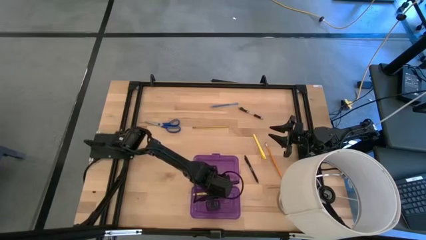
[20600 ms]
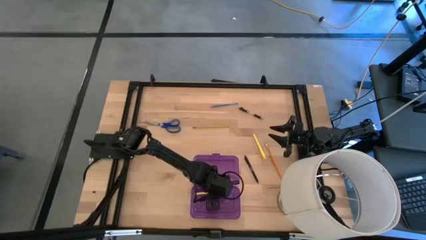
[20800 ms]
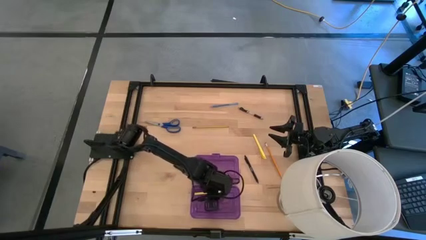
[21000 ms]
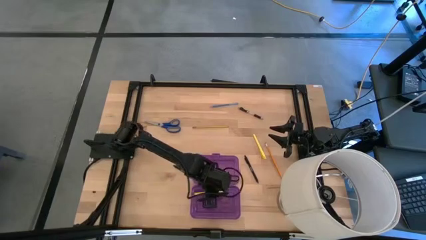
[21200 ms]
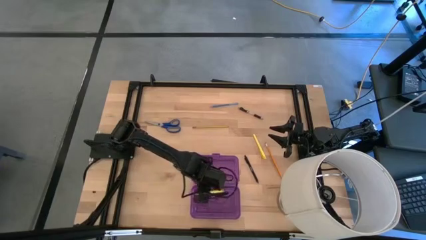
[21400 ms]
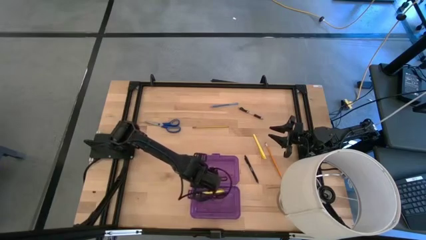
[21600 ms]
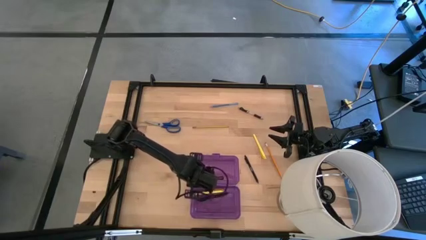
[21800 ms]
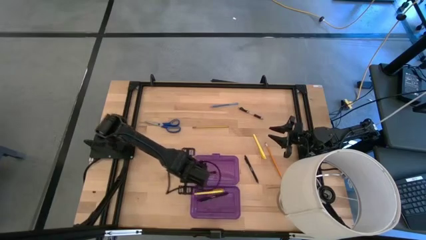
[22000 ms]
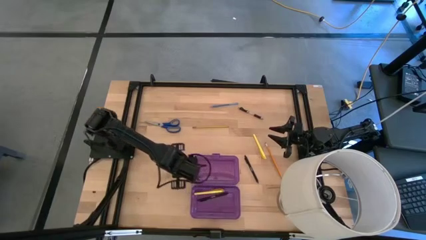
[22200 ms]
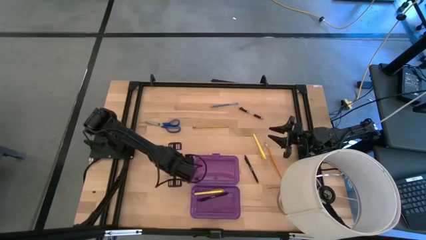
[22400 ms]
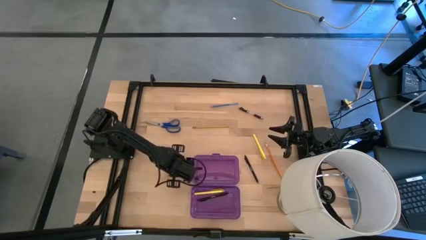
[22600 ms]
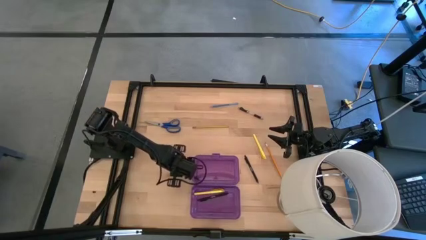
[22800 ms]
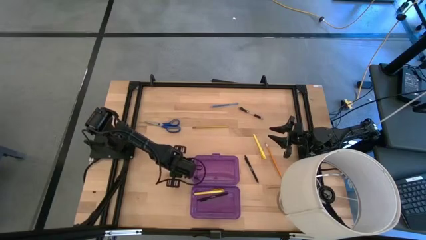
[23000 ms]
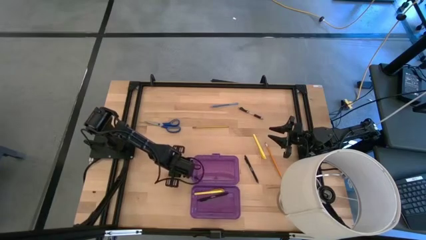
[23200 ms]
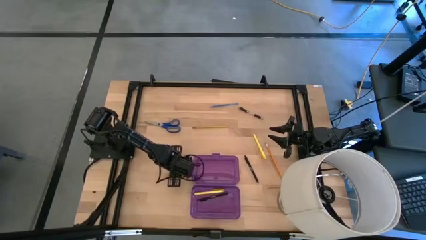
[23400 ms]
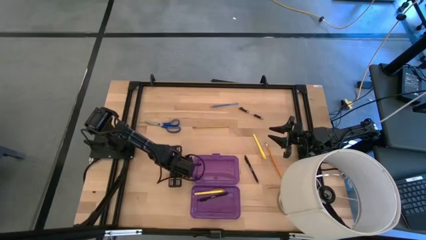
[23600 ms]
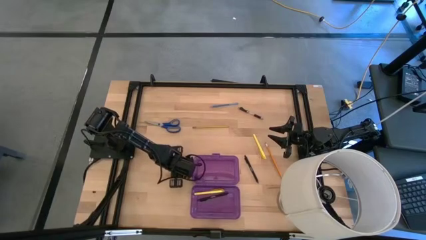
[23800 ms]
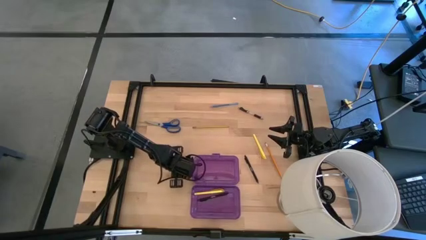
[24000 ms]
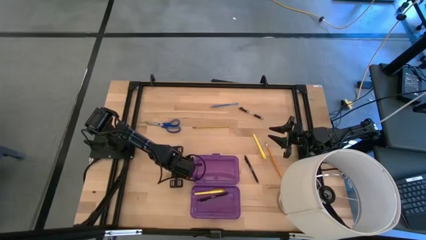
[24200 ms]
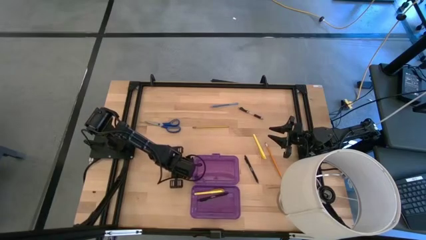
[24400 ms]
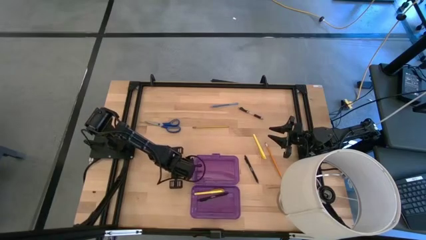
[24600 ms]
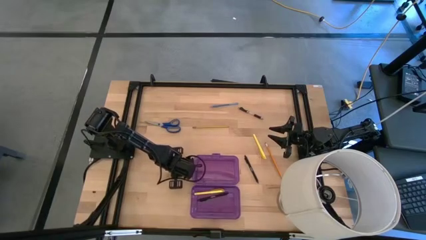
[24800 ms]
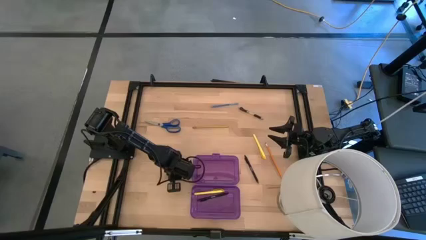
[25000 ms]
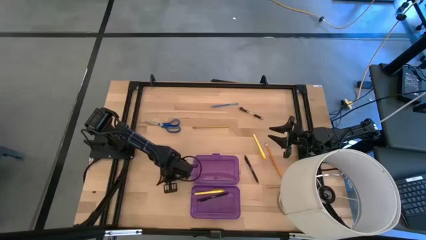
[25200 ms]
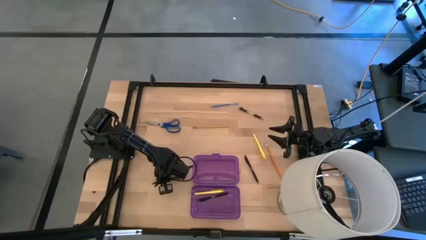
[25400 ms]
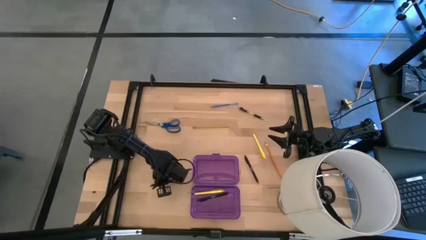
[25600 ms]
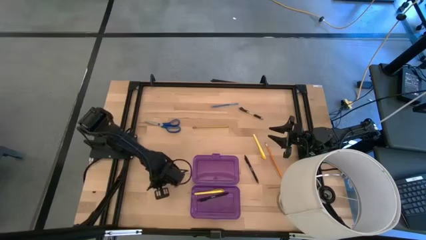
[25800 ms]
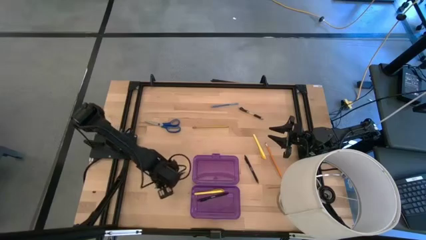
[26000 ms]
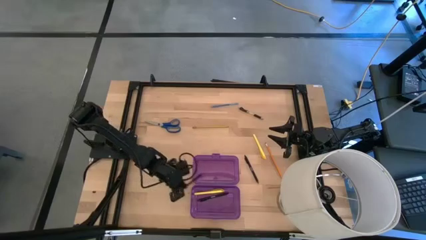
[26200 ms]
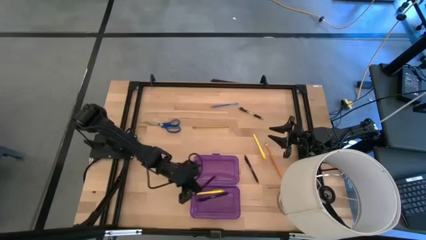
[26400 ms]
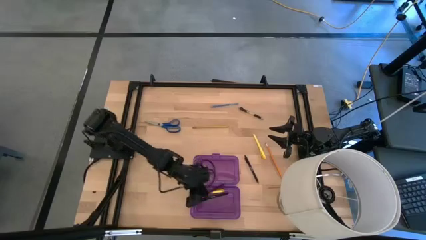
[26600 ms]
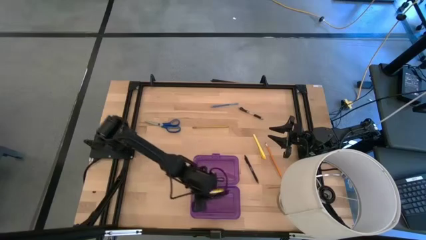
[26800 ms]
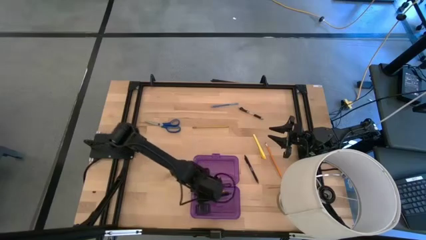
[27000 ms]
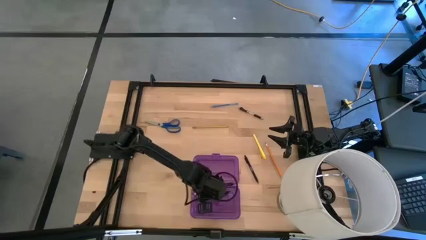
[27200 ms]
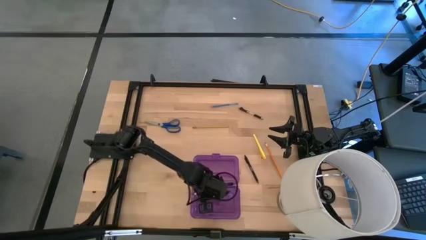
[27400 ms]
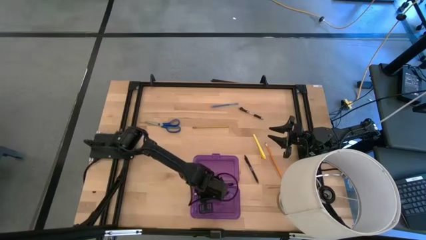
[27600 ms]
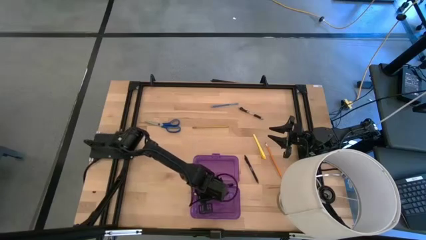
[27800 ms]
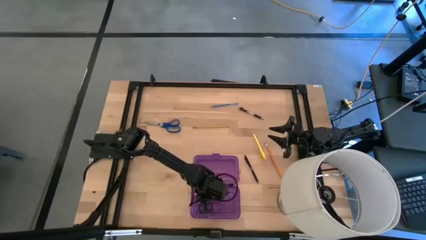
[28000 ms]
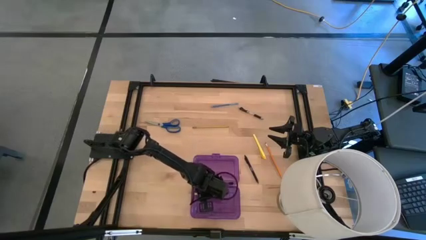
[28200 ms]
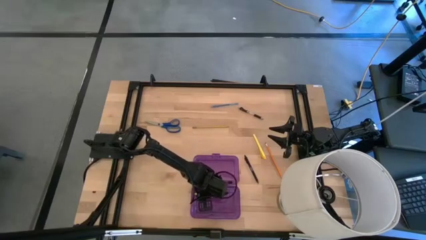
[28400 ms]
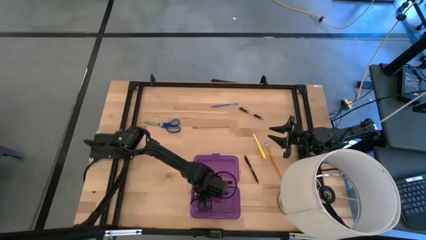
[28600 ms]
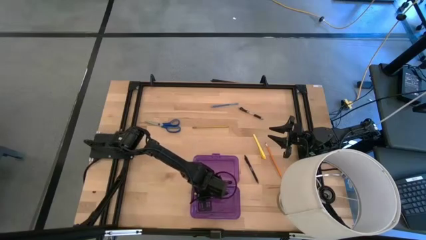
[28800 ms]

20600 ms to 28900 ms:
Task: Pick & place school supplies into a supply box
Put the left black pen into the violet supply box

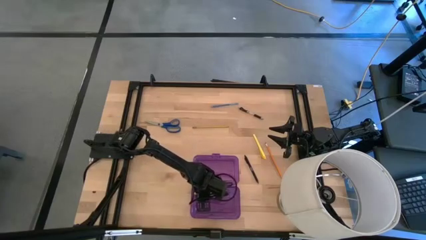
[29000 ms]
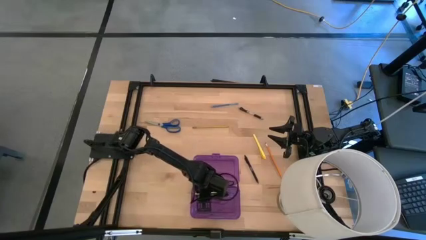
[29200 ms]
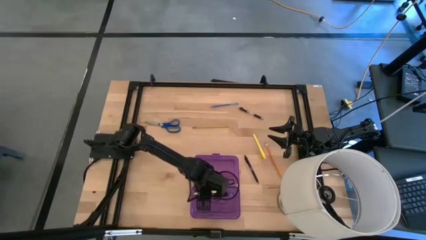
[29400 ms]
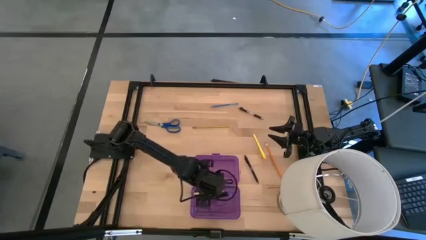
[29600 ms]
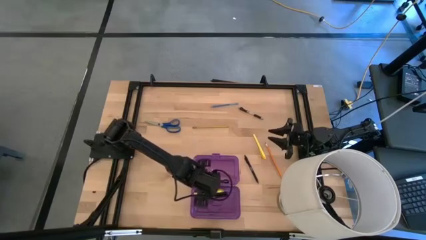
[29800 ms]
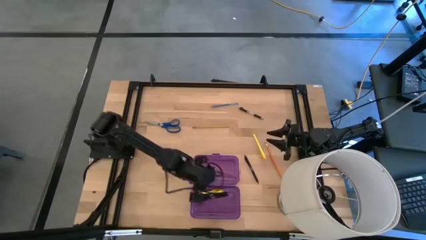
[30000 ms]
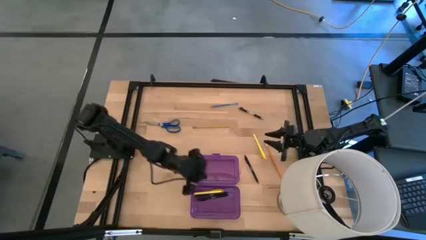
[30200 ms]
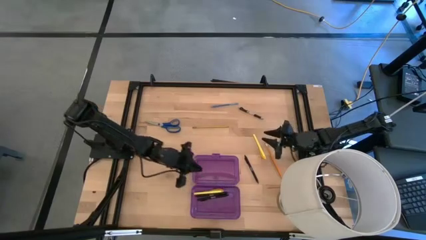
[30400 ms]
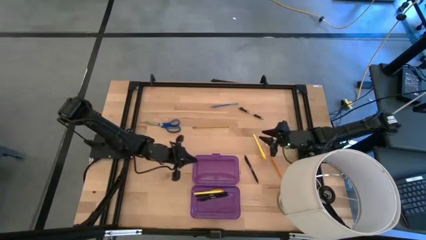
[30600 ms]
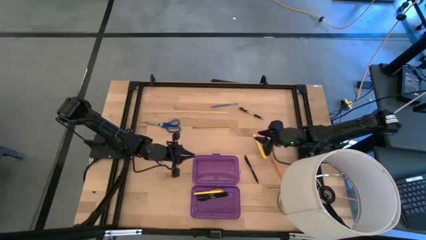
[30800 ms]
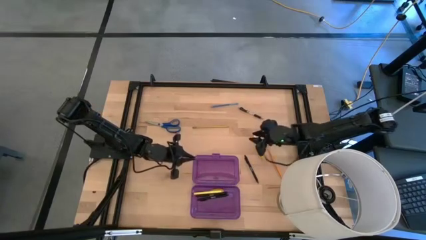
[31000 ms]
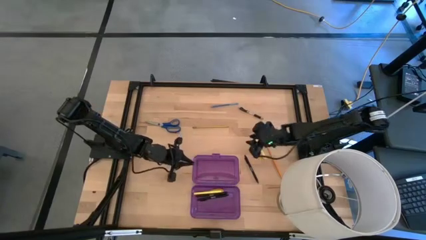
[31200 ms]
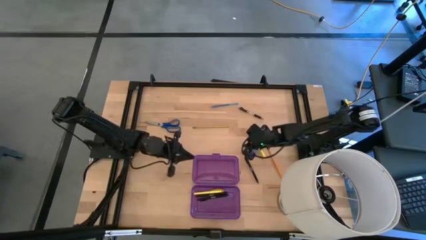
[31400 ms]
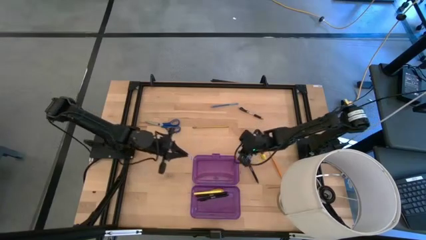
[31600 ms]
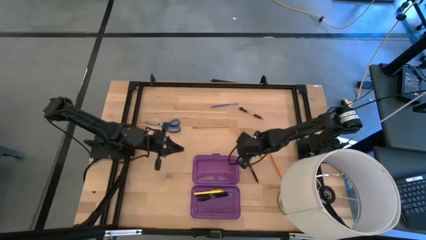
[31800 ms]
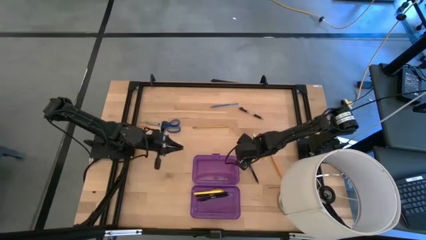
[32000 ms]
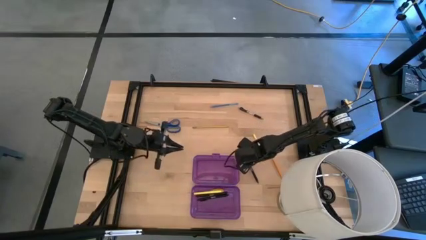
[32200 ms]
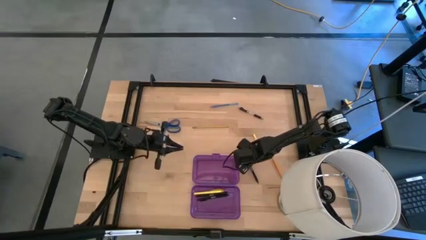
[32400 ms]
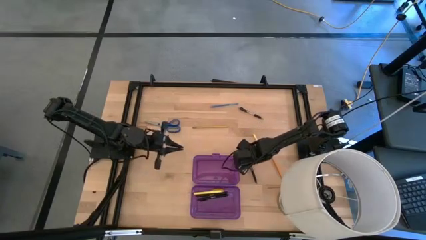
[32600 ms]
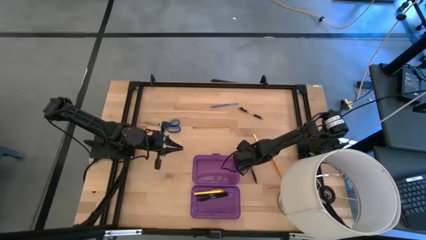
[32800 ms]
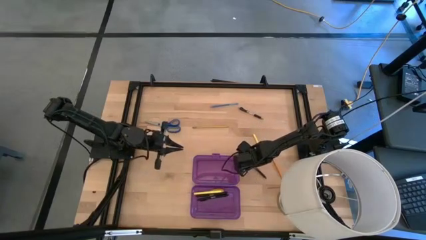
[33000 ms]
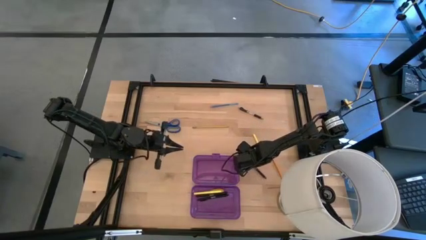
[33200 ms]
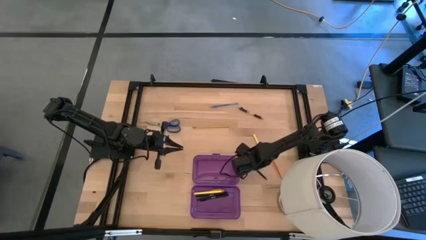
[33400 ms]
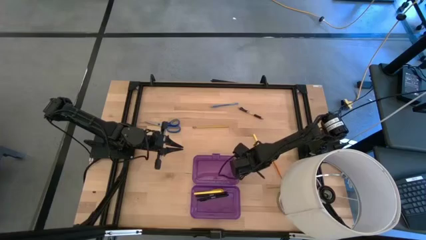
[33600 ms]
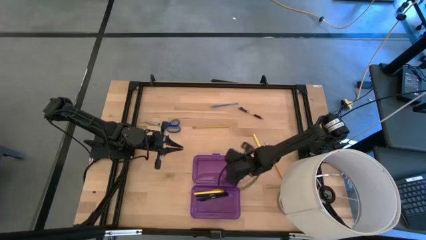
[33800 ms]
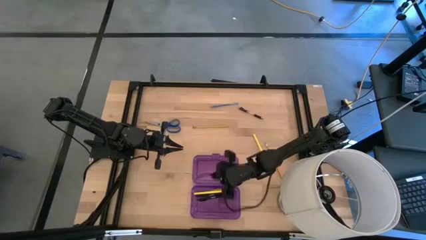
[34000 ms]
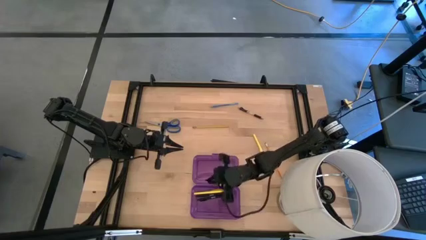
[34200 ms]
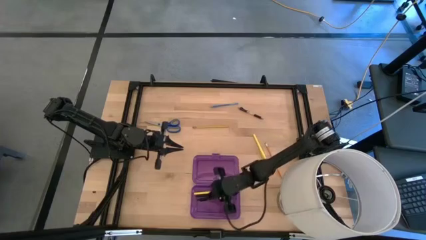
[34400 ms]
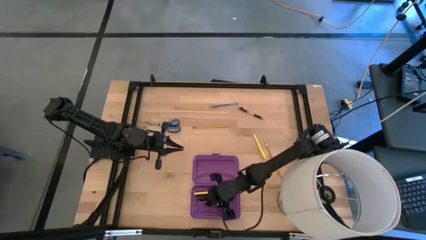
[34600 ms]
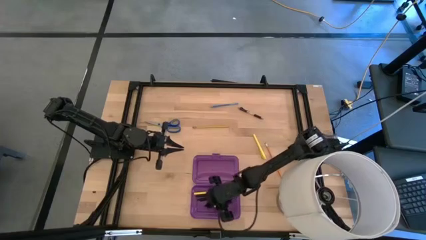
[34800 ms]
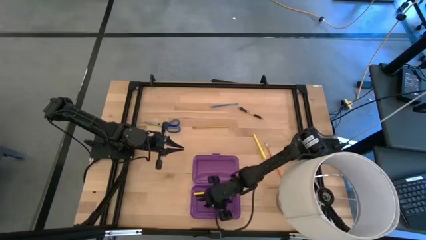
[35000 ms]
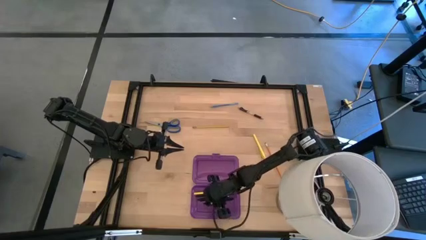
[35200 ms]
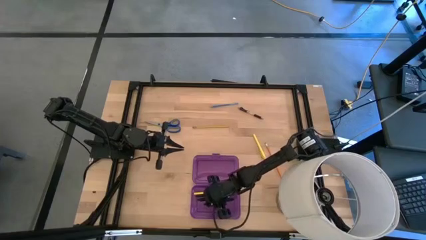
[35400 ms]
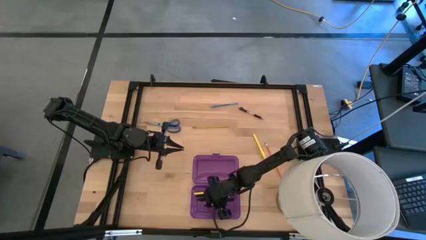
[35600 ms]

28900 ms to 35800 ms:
Put the black pen into the violet supply box

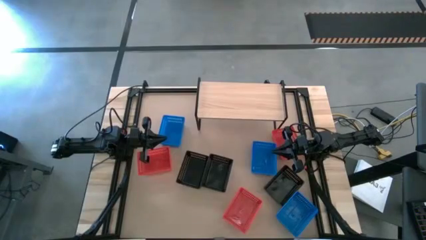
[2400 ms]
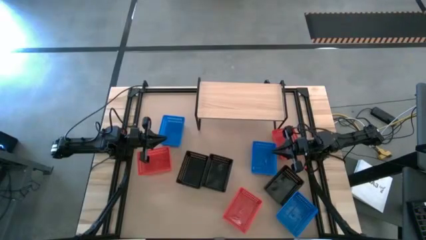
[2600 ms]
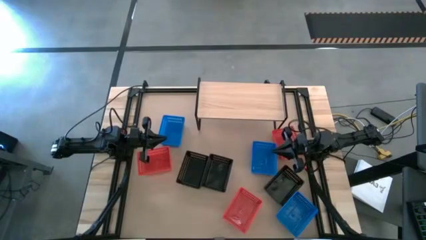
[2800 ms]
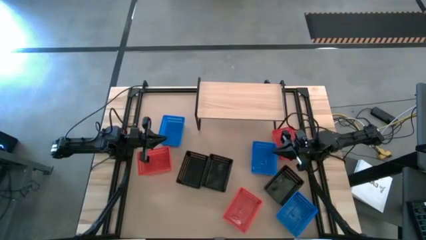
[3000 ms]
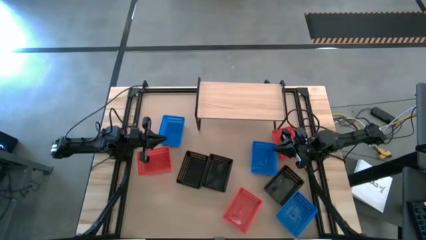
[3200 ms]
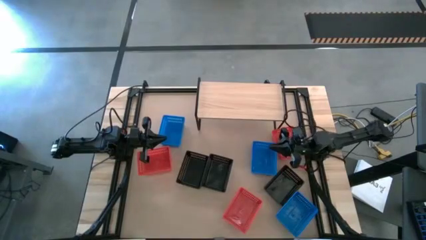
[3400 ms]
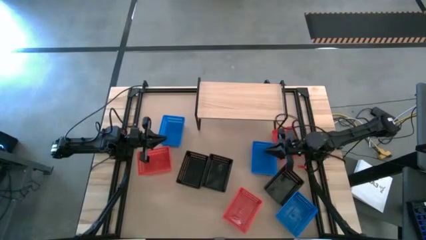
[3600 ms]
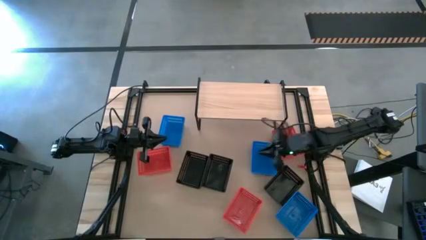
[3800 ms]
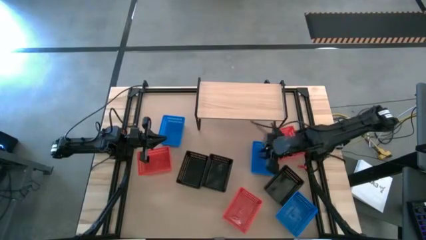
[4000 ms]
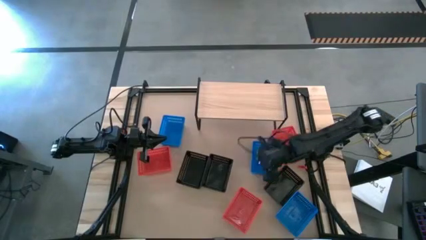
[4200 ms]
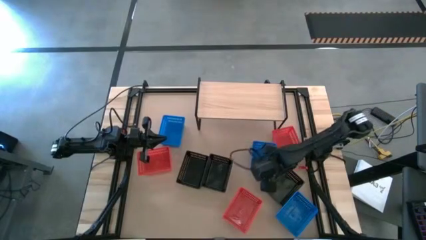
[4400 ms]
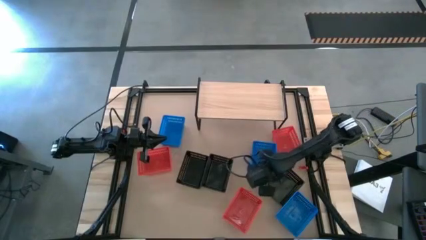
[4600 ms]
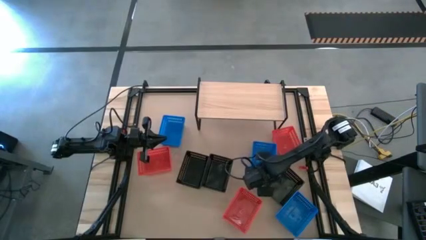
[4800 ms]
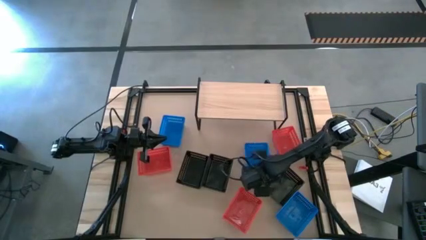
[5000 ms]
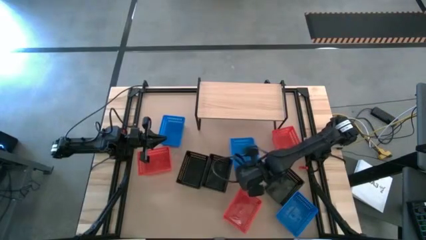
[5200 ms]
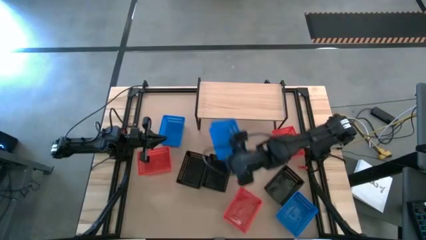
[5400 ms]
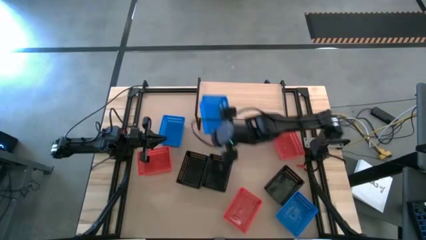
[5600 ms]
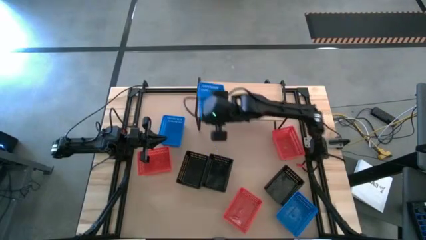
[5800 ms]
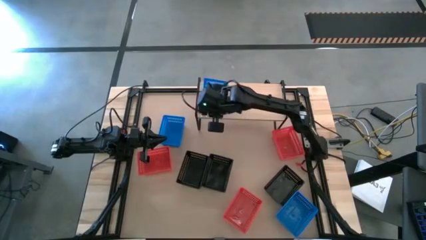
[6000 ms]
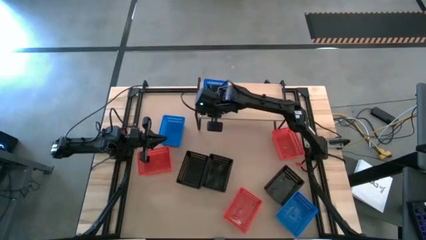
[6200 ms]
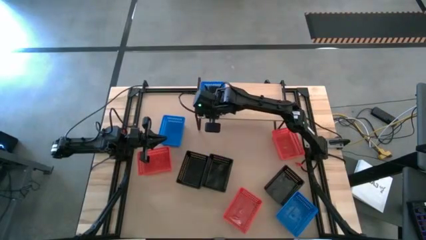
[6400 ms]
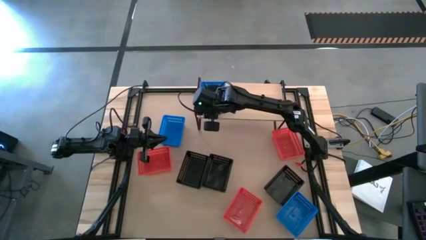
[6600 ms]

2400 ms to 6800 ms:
Task: Stack baskets on shelf by color
Put the middle blue basket on the shelf
